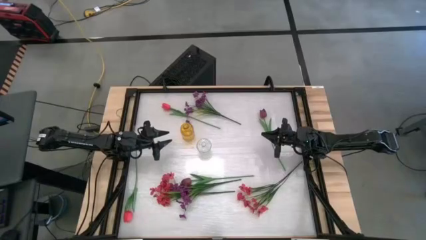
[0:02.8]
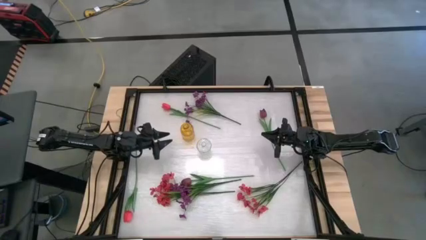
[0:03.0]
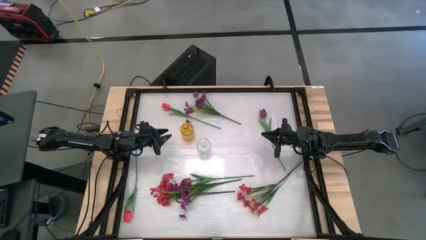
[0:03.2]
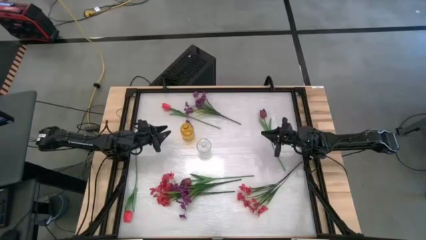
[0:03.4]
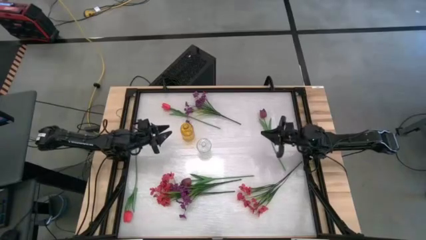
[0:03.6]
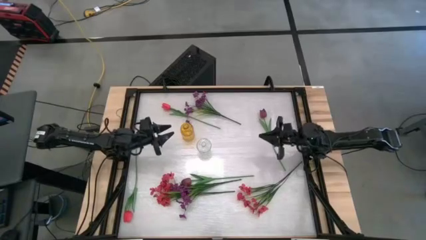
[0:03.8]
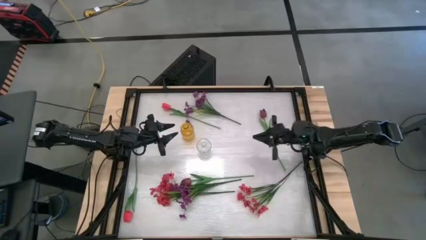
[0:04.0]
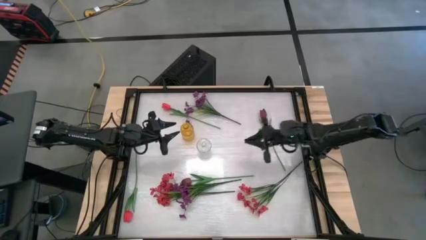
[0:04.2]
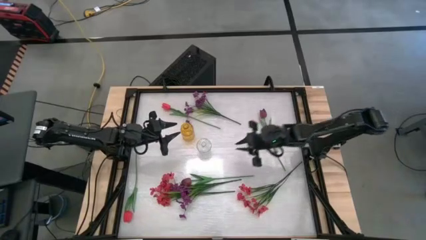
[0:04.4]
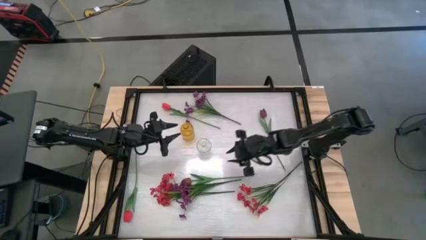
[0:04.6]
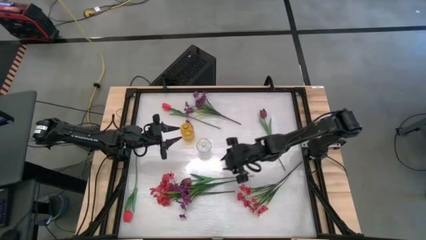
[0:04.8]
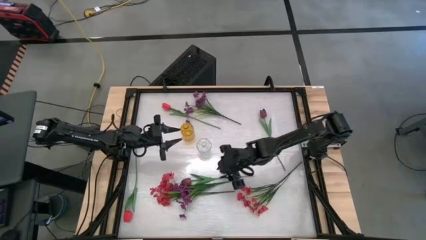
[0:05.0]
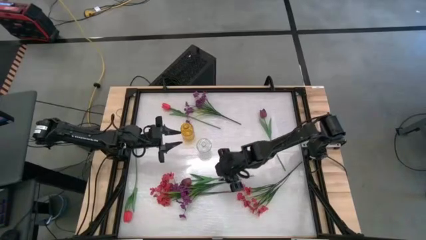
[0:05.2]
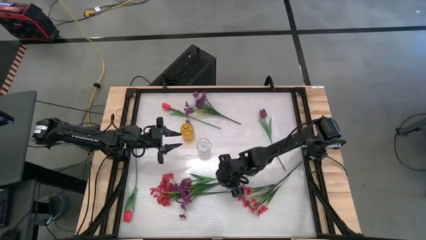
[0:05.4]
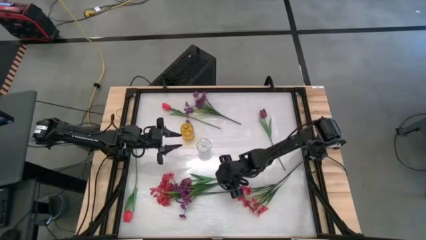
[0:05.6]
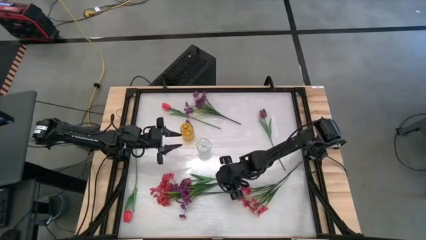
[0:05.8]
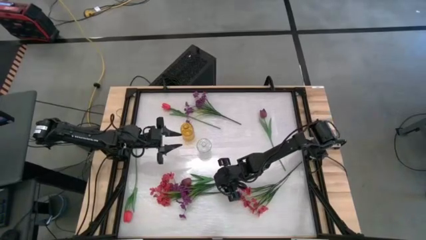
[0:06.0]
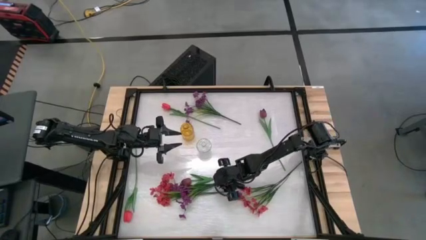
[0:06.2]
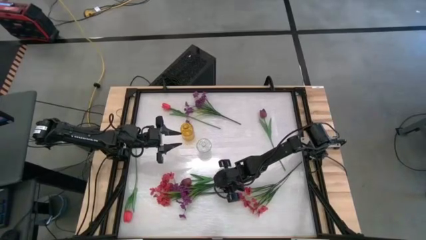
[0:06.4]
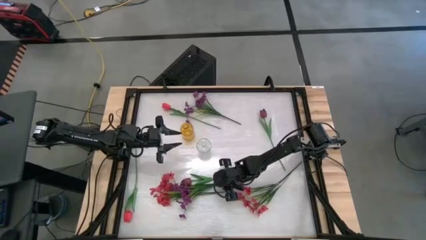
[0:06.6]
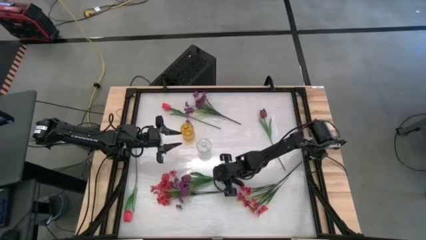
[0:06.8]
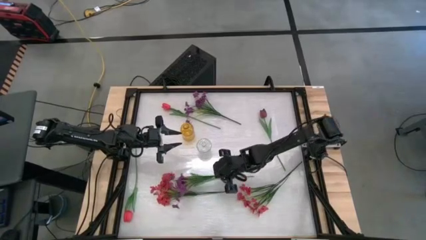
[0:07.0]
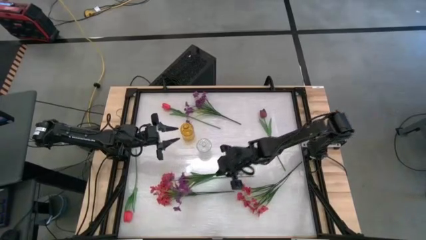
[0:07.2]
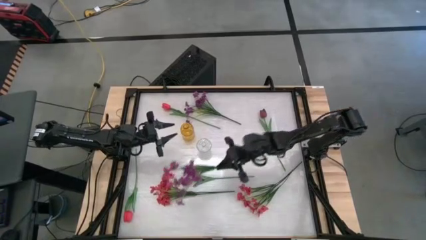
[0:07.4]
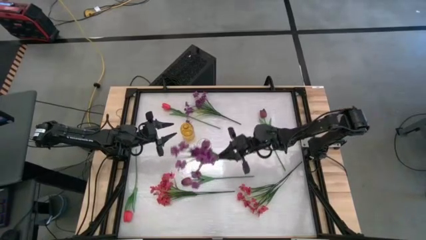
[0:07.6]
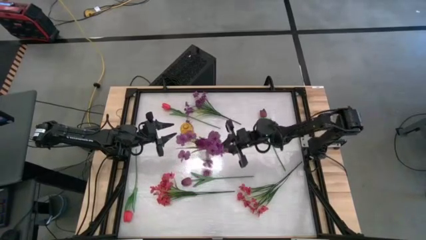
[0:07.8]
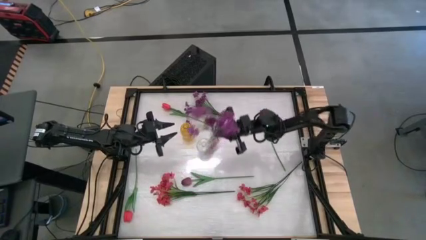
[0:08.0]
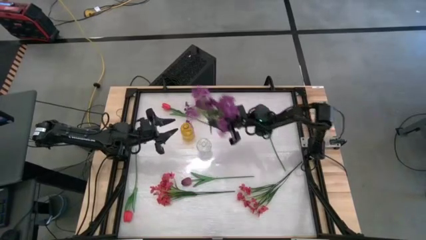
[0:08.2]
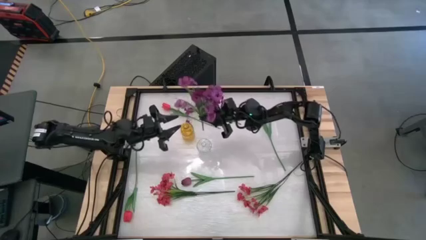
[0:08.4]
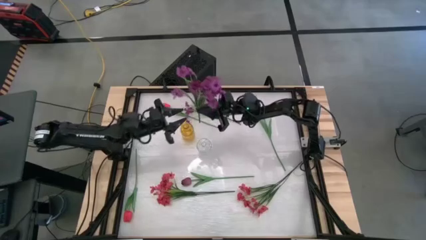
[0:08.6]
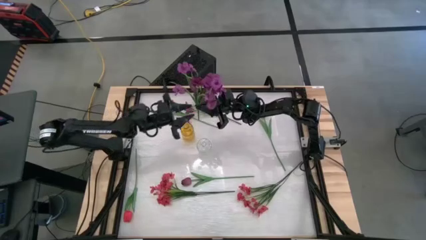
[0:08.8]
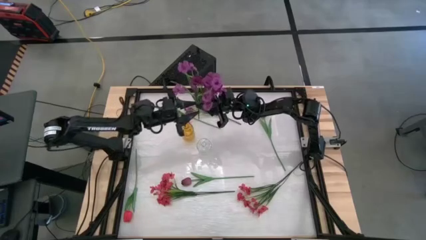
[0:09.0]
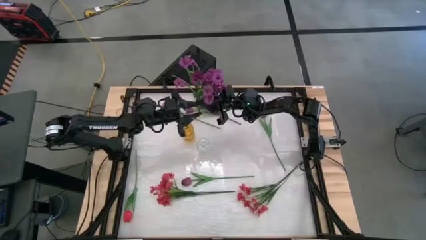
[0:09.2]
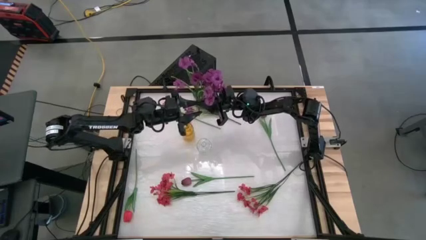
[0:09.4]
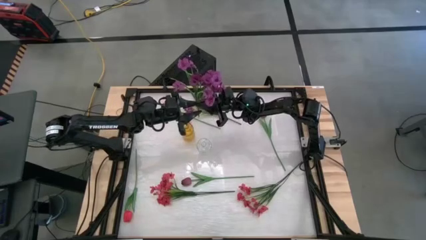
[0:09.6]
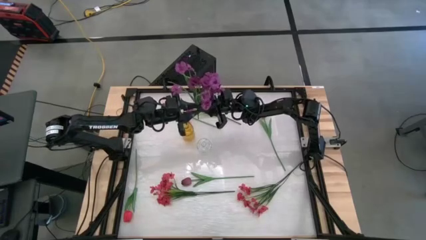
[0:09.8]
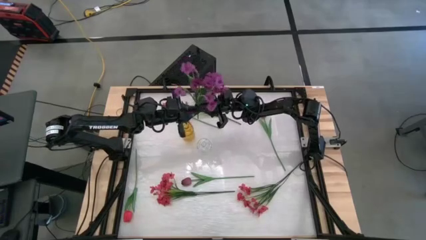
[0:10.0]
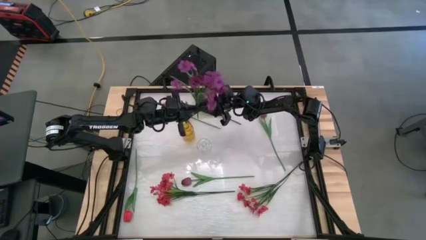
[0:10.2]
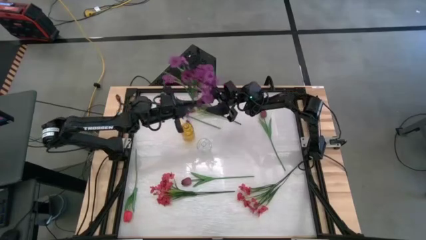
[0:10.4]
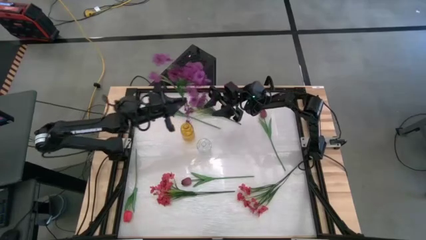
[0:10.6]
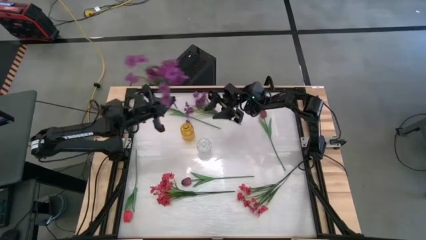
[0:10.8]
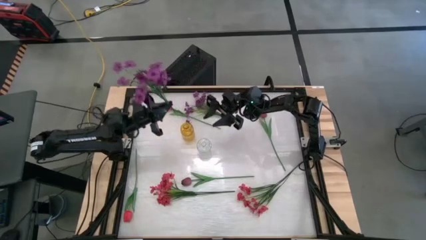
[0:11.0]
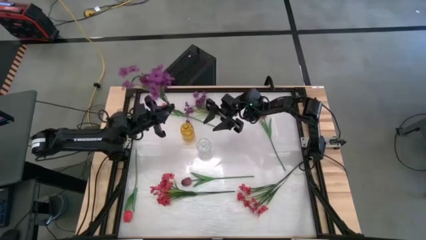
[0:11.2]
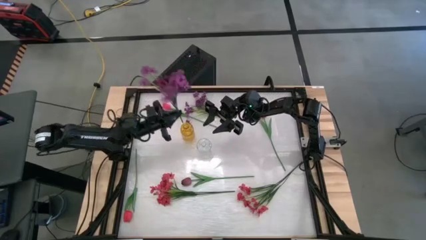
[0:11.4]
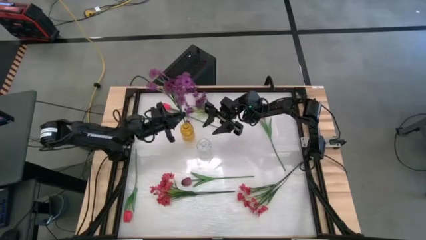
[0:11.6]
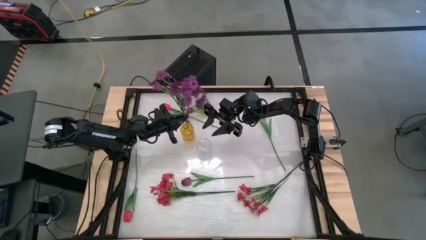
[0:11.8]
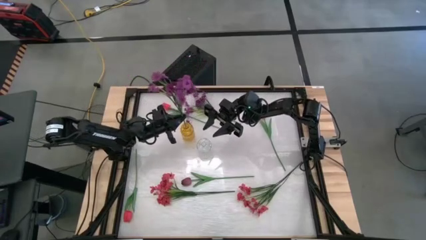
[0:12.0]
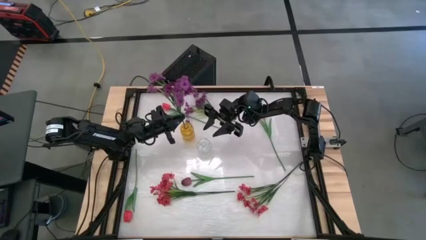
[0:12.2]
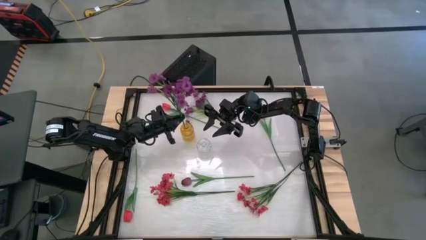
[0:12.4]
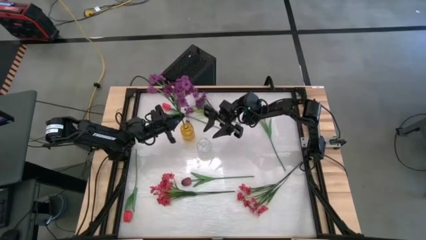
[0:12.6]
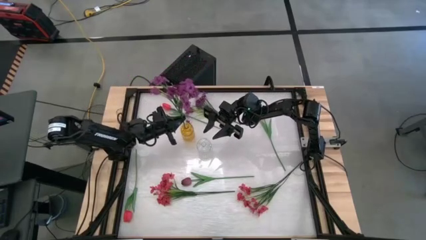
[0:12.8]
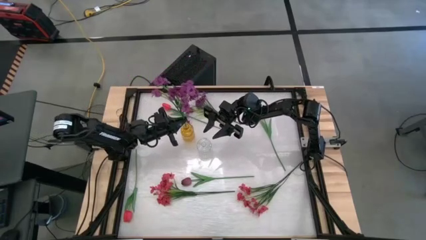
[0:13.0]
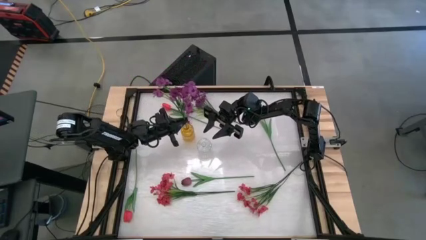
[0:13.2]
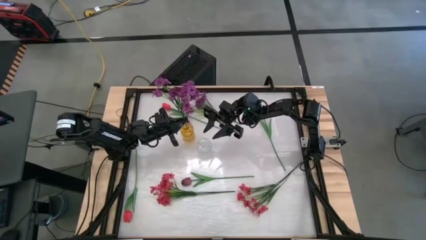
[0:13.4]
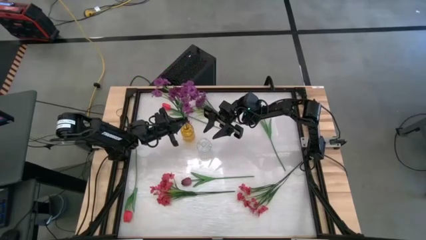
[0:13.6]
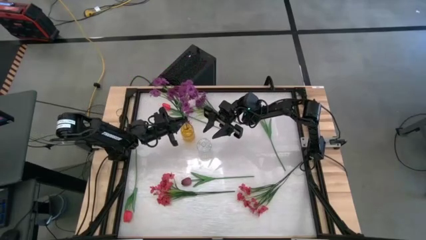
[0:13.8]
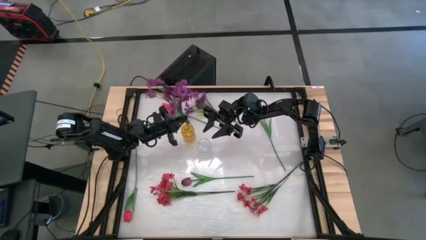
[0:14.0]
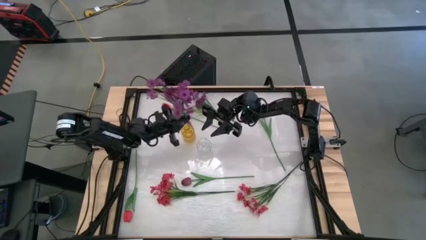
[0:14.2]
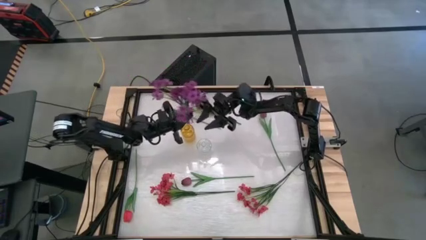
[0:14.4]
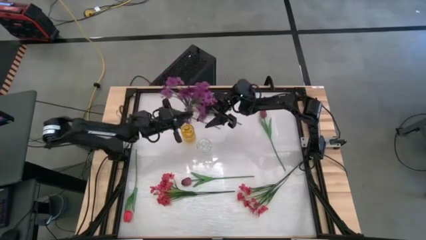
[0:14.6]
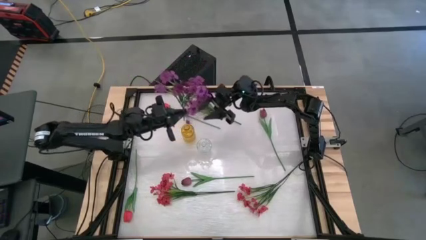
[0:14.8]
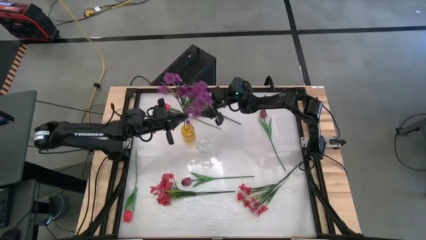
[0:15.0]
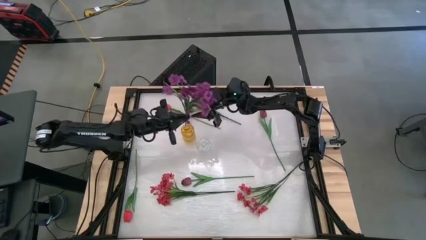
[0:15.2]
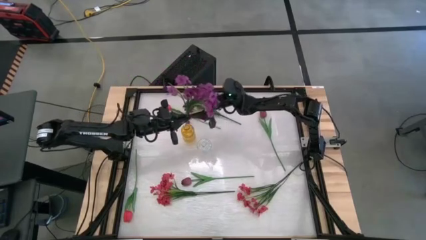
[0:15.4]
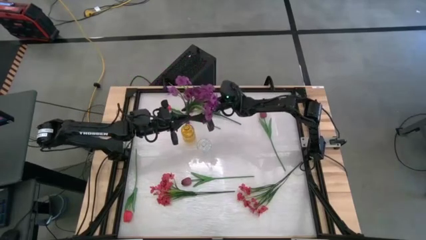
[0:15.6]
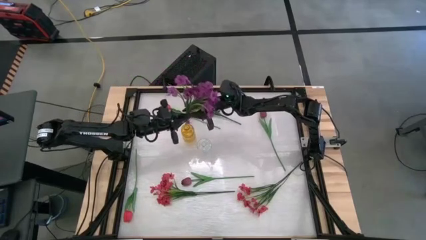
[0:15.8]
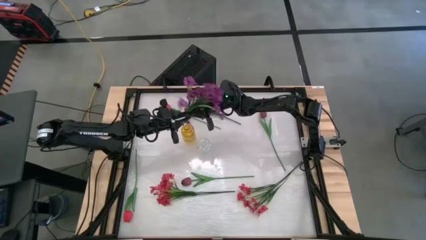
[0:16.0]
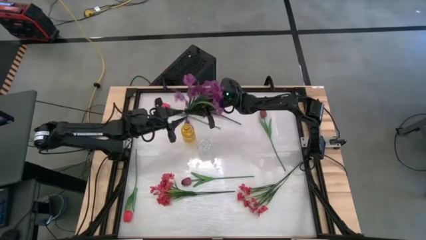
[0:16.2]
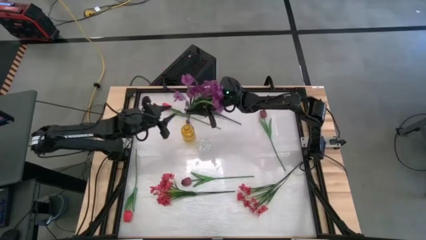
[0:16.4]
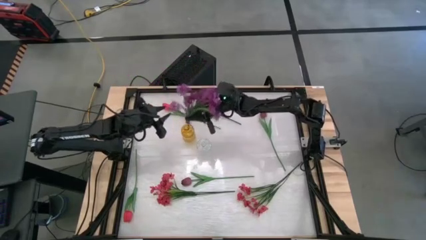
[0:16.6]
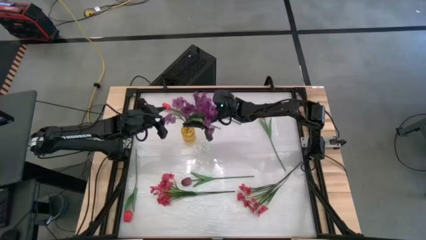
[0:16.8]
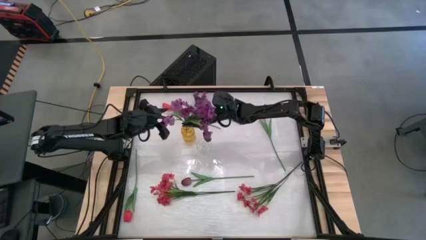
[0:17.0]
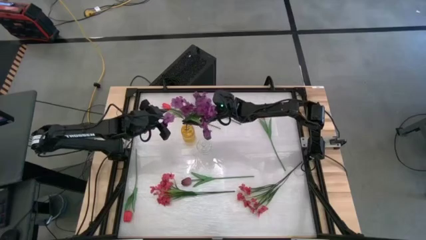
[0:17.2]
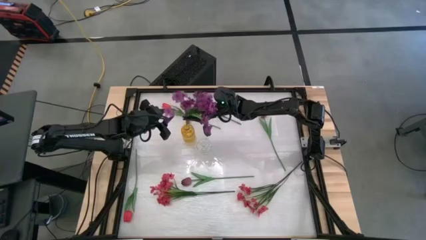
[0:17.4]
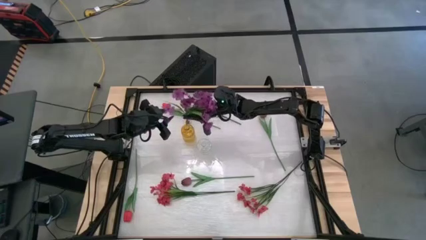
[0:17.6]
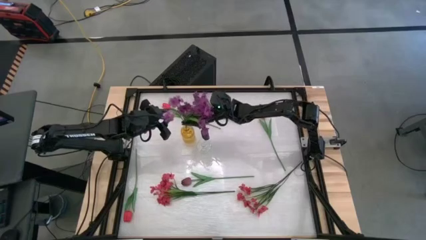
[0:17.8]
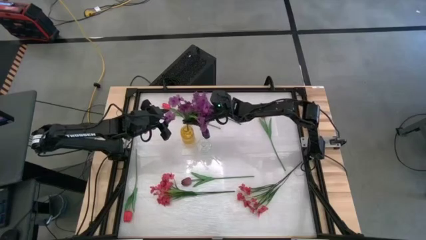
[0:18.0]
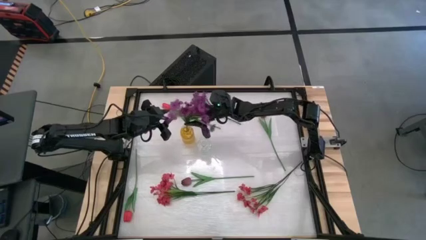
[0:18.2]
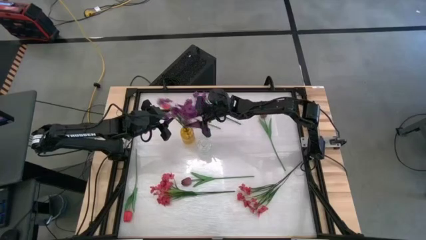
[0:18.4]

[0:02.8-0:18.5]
Task: Sort flowers into vase by color
Put the bottom violet flowers into the yellow vase

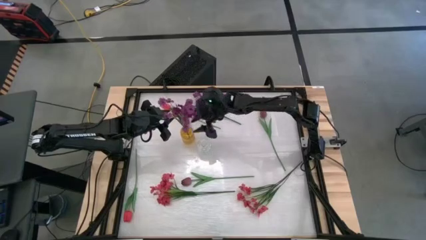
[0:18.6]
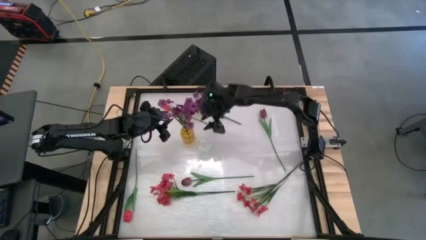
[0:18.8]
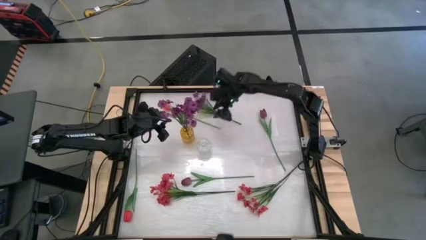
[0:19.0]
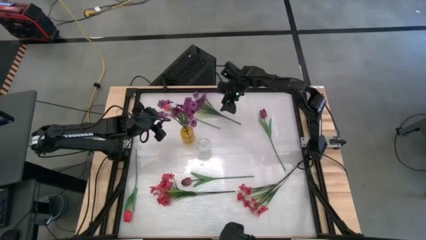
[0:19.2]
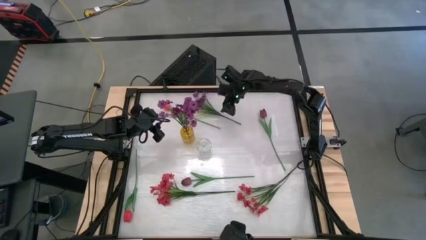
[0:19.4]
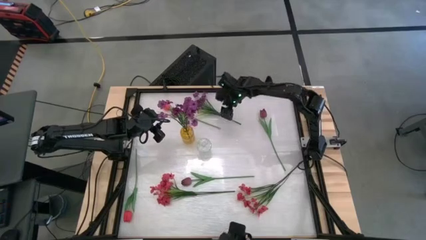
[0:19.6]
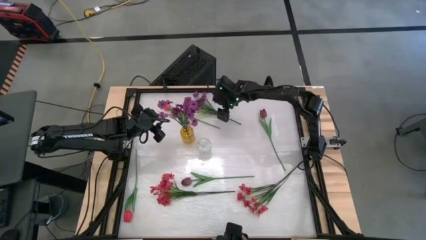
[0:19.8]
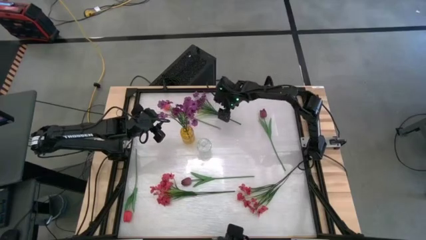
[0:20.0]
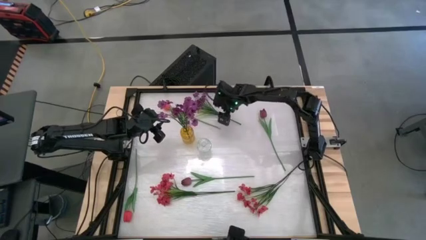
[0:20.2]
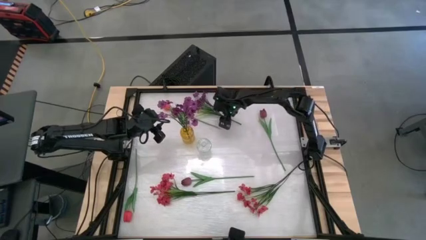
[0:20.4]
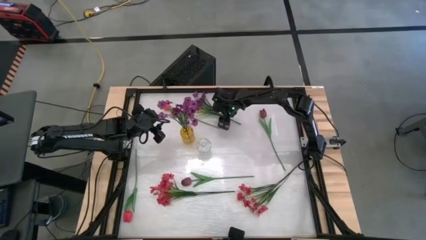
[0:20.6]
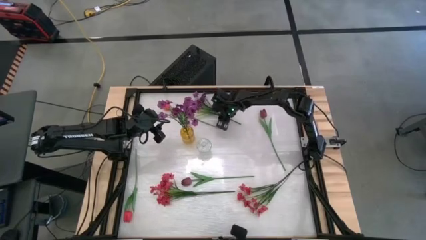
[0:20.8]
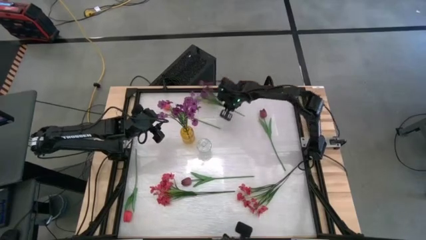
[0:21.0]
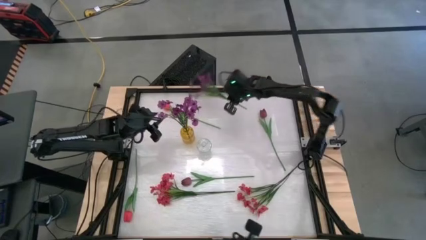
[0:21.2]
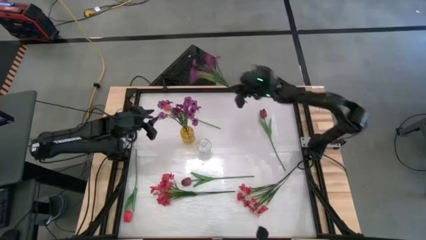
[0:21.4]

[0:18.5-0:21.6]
Put the violet flowers into the yellow vase
